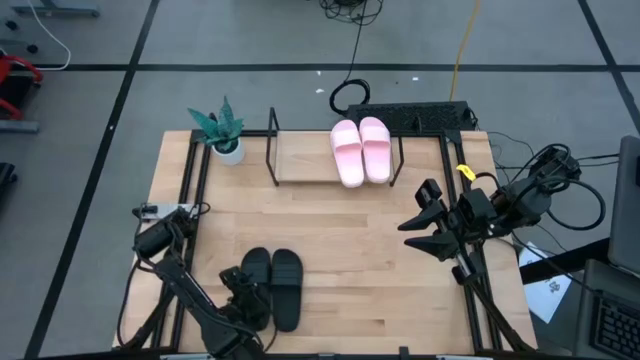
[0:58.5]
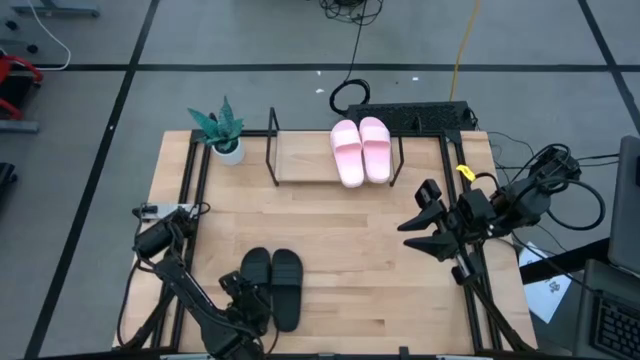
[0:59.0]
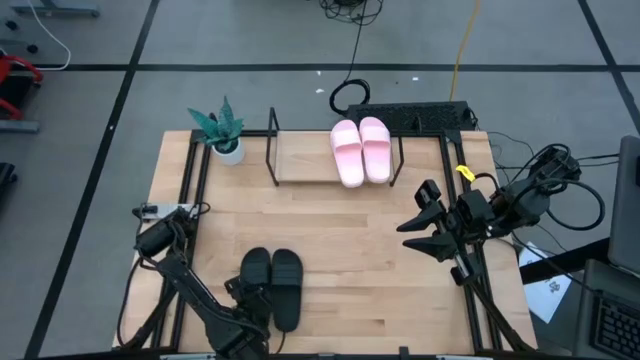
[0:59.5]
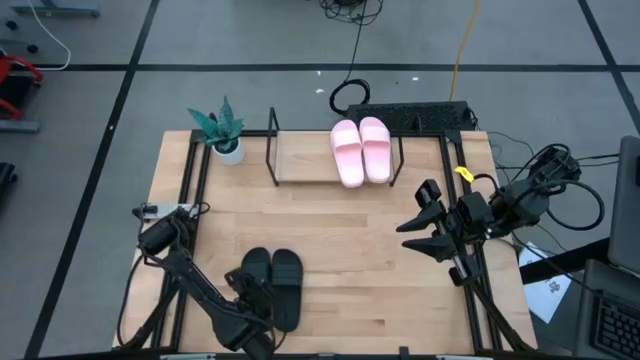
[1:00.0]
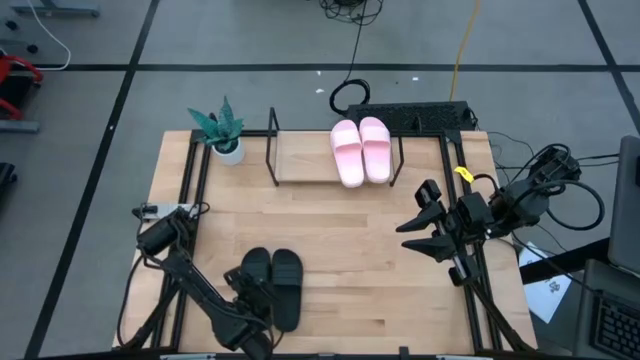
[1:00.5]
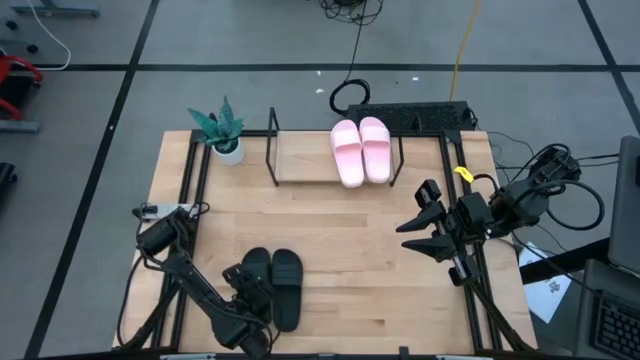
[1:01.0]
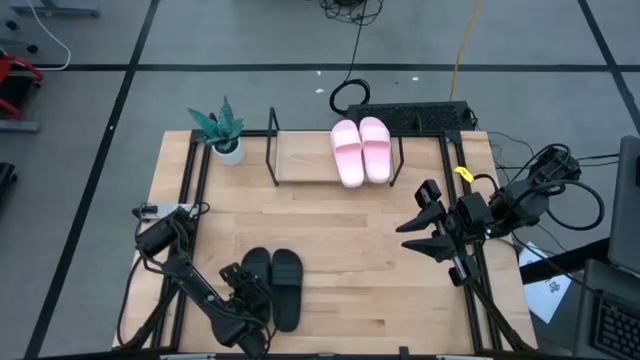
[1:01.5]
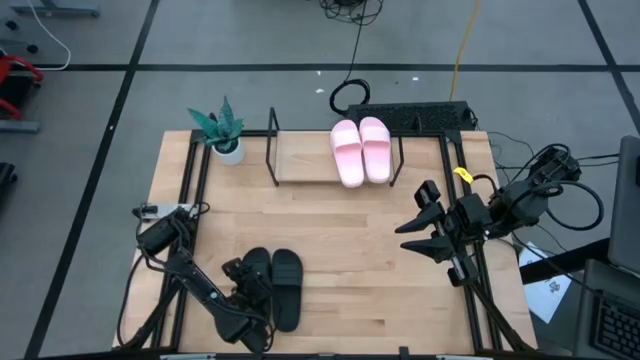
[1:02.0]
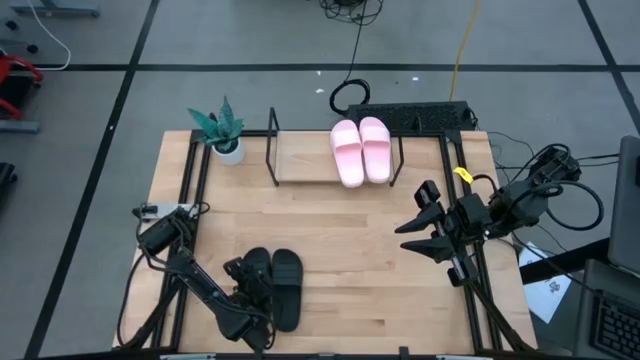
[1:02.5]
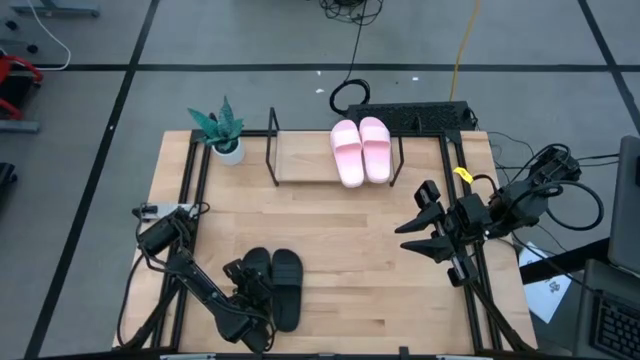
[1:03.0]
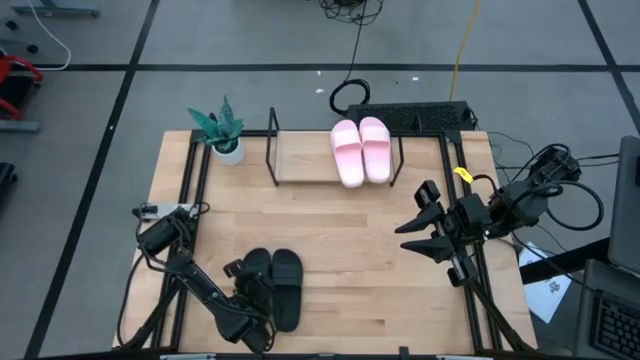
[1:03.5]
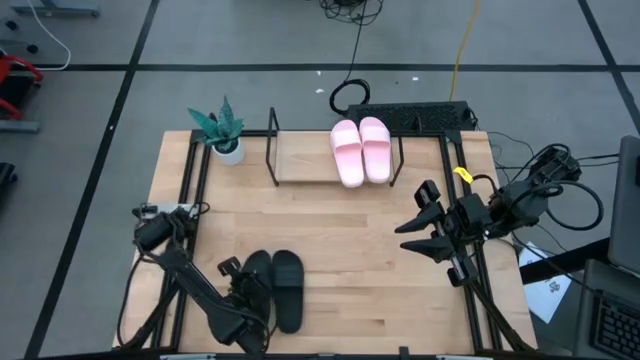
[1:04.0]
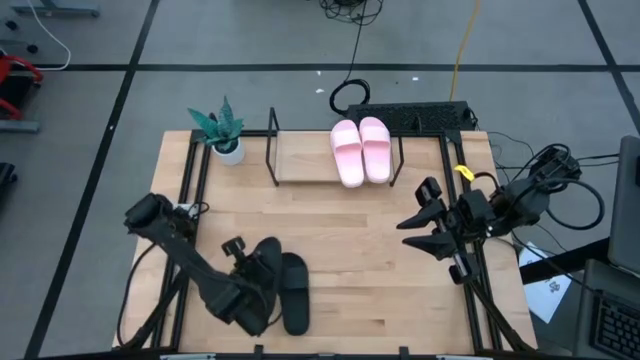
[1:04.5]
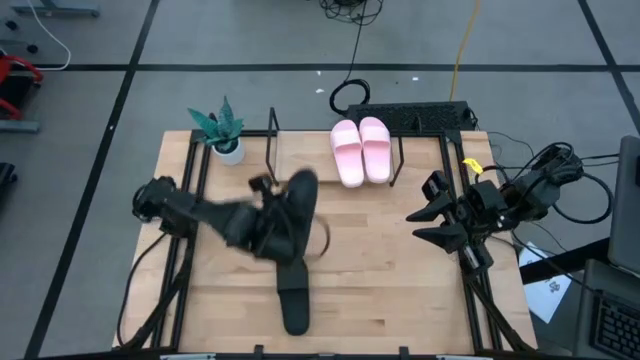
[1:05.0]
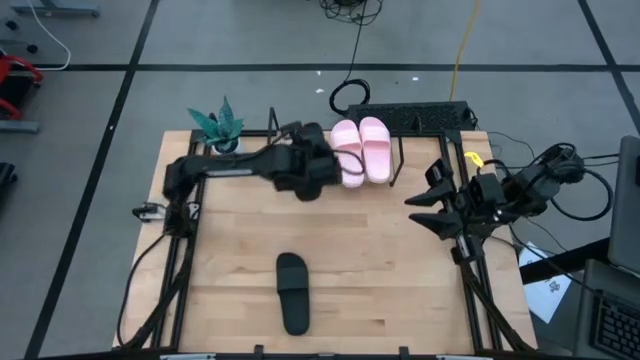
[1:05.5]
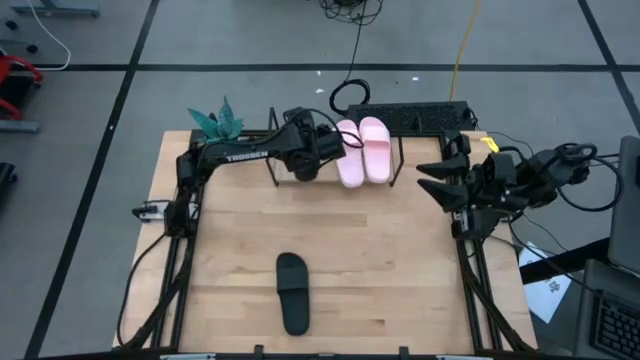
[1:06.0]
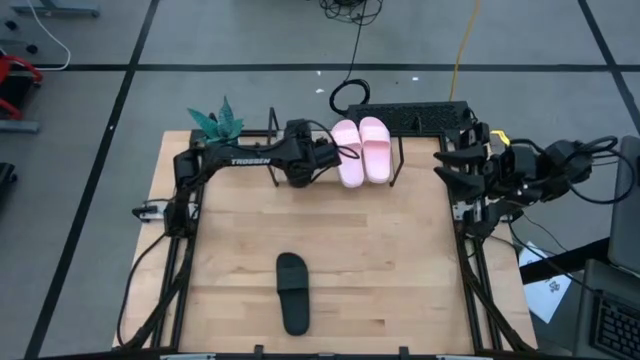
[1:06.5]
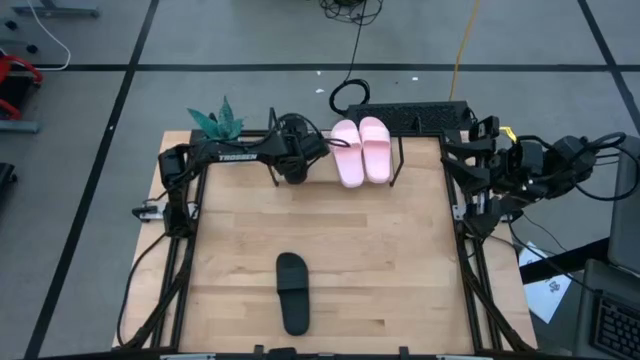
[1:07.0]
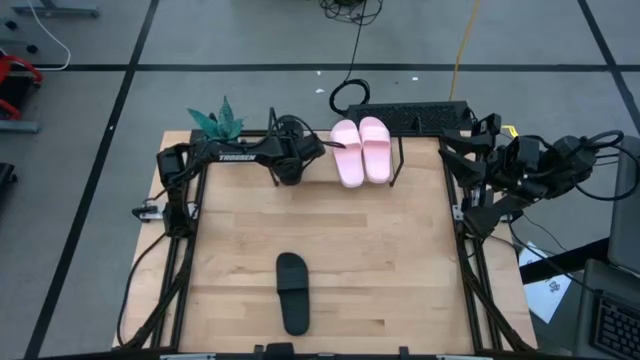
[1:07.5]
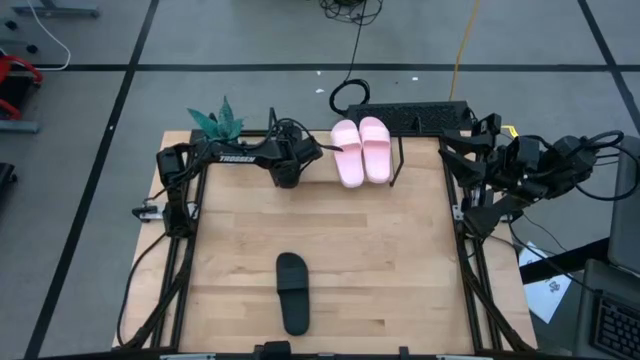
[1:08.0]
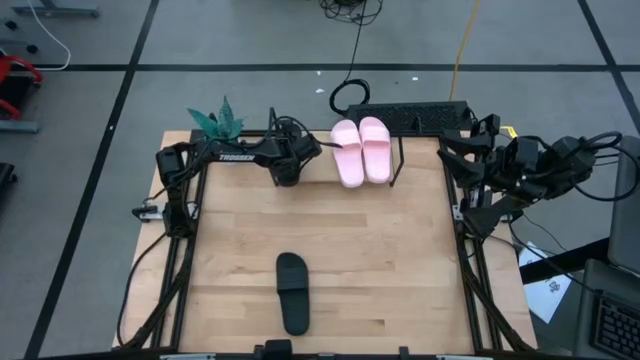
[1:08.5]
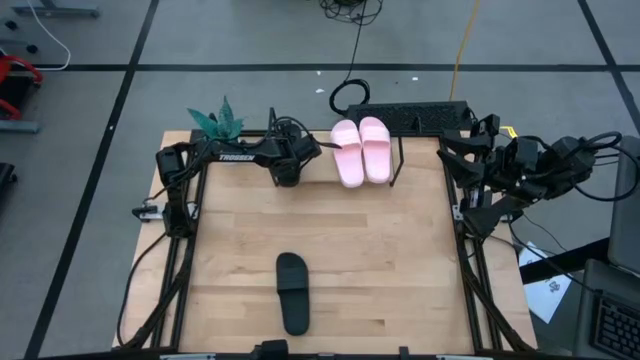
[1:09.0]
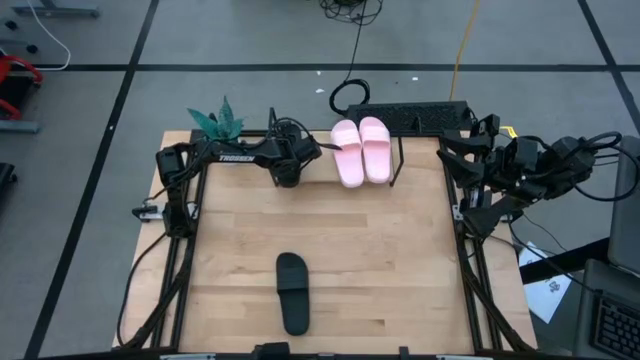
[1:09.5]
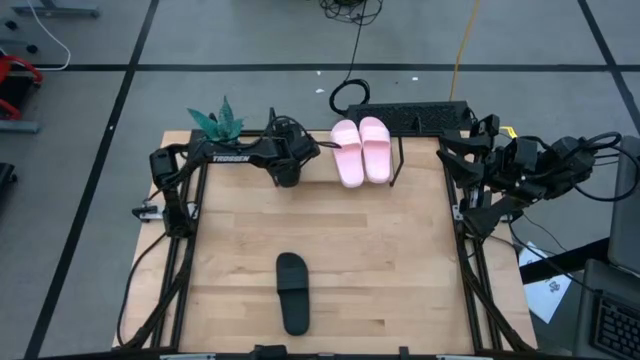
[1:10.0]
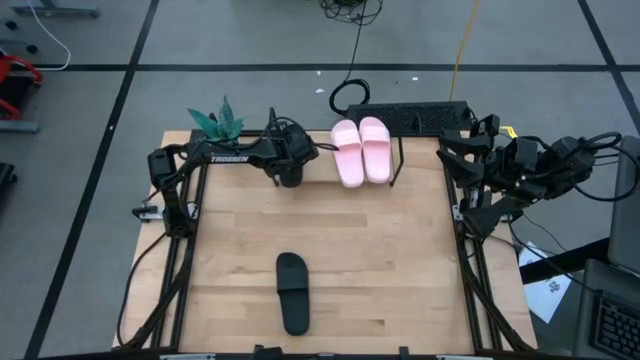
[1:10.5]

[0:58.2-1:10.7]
Task: Pick and place slides into the shelf
Put the left black slipper on the shelf
